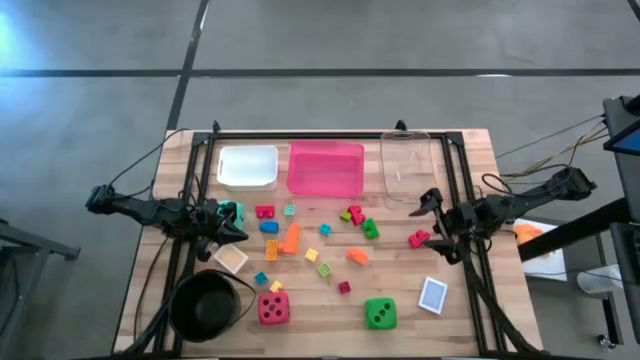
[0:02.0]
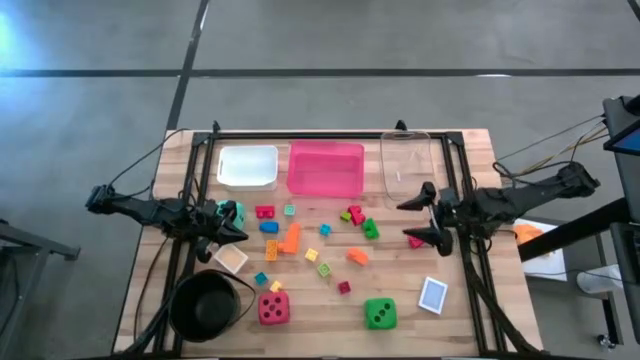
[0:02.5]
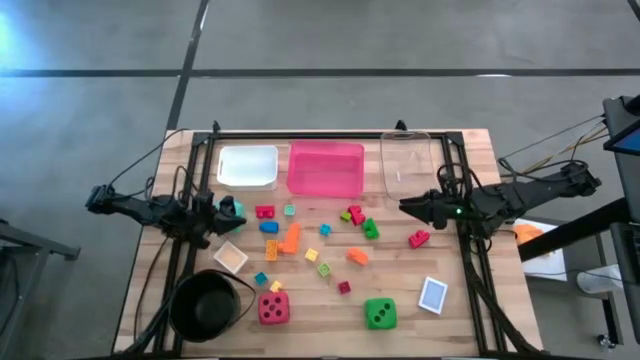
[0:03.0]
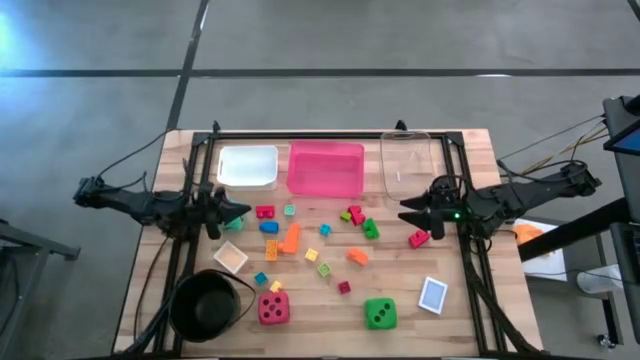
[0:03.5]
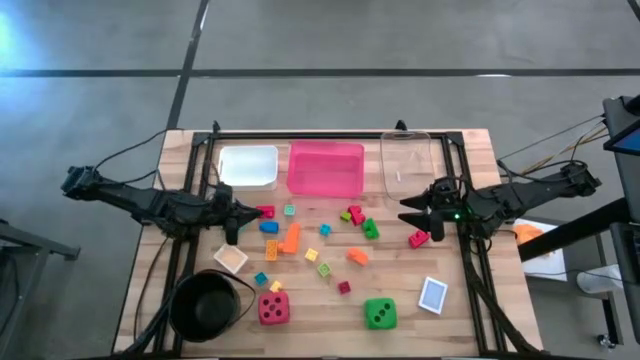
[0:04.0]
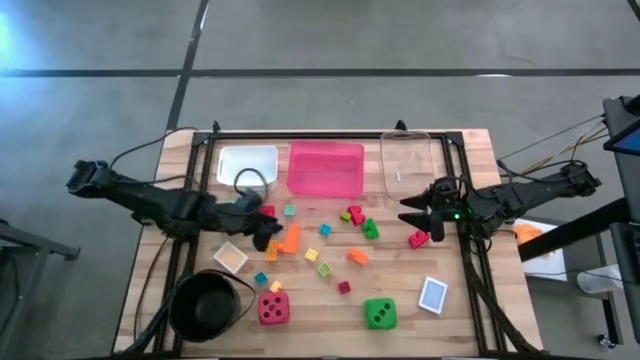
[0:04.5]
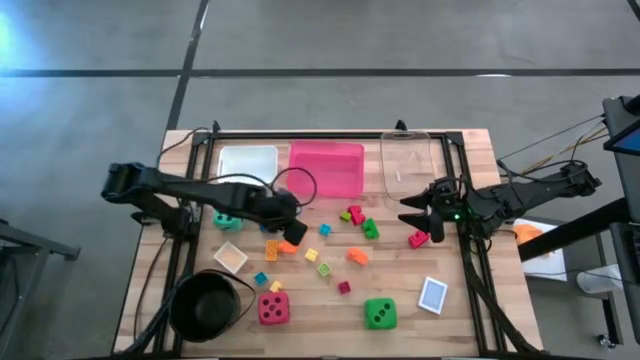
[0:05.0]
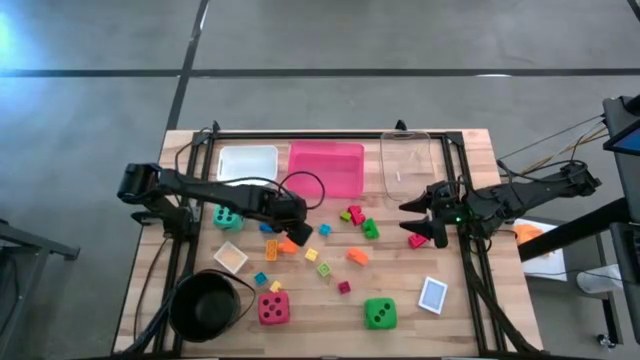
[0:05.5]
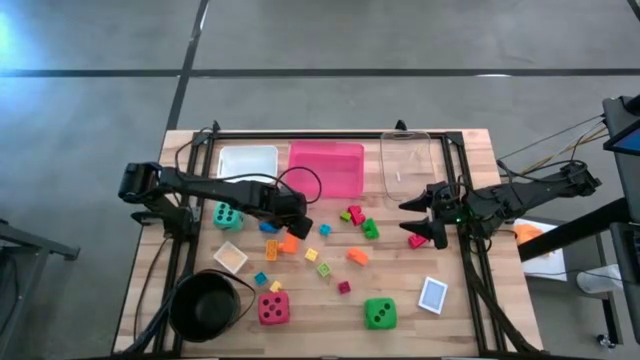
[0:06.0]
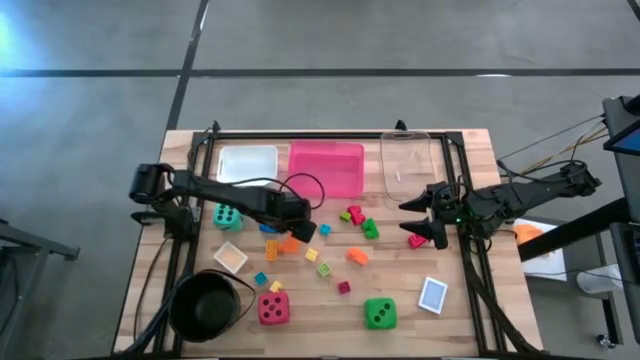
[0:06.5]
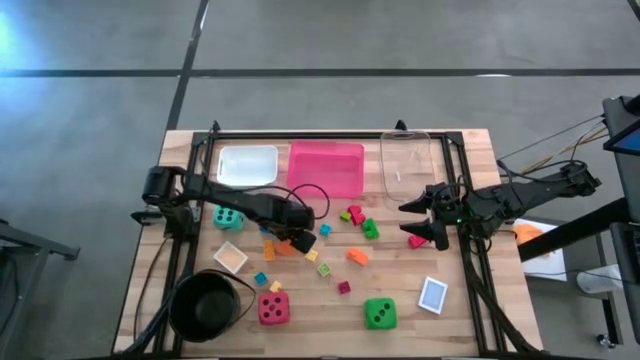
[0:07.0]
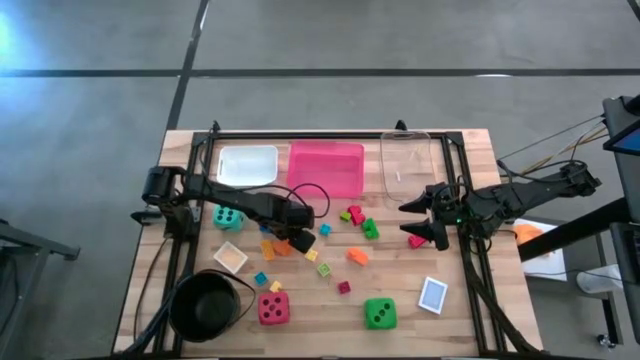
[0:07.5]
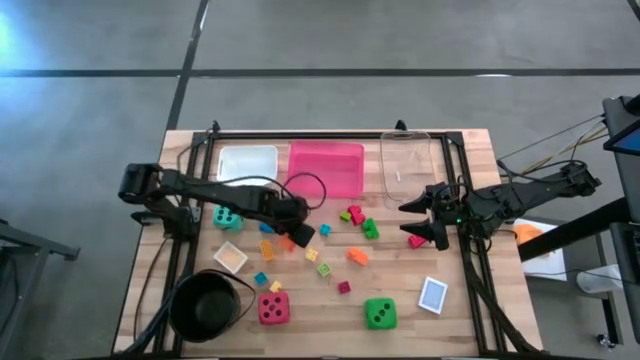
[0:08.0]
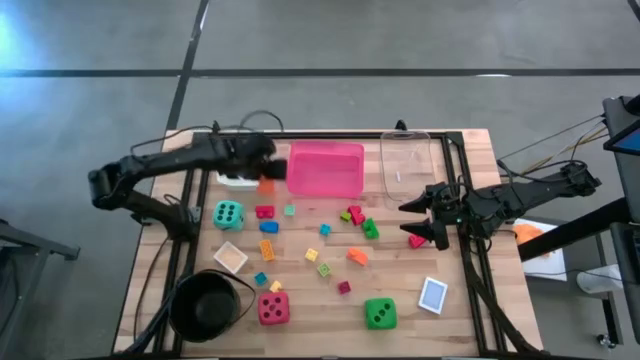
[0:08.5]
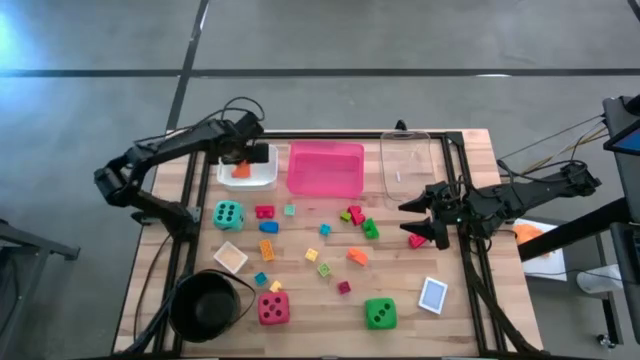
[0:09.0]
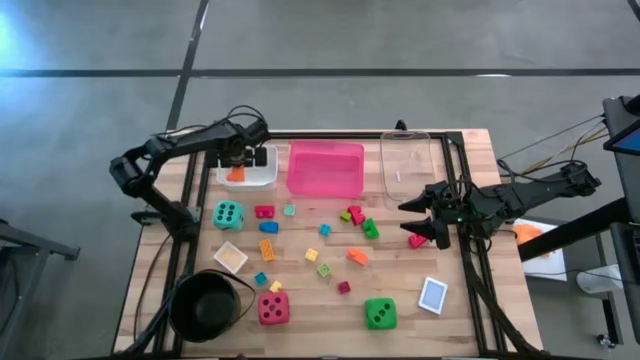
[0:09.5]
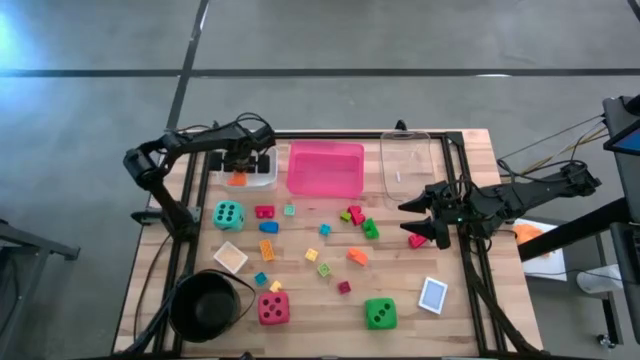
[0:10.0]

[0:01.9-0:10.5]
Task: Pick & Place Toys
Put the orange game piece into the white bin

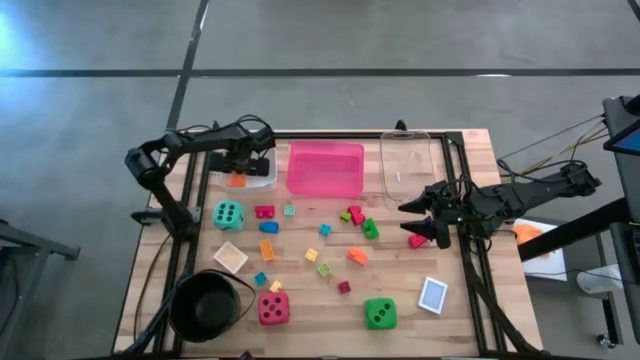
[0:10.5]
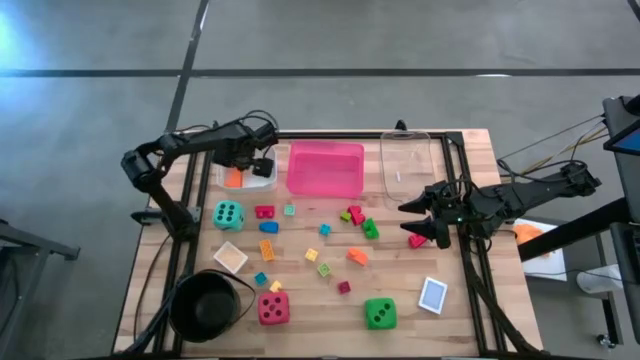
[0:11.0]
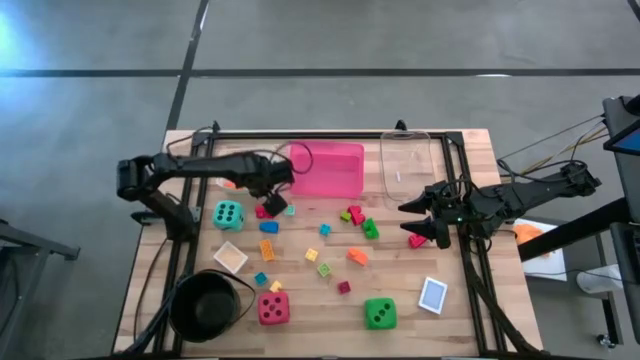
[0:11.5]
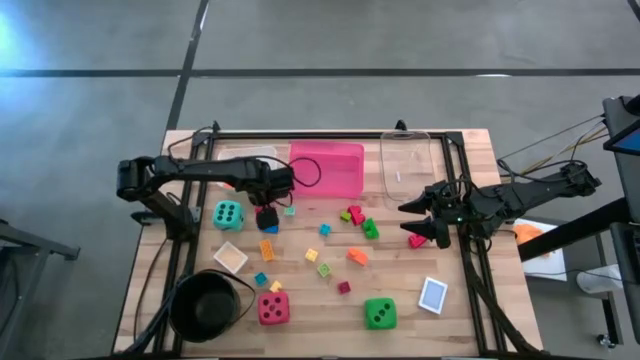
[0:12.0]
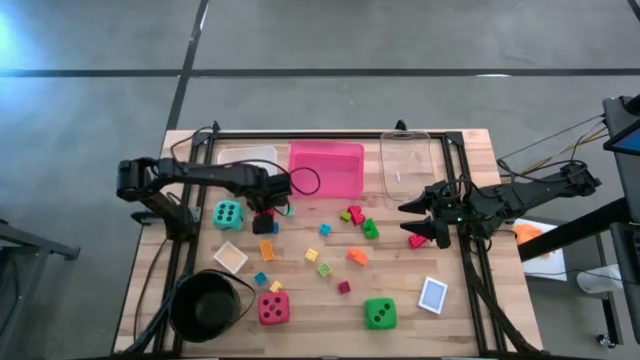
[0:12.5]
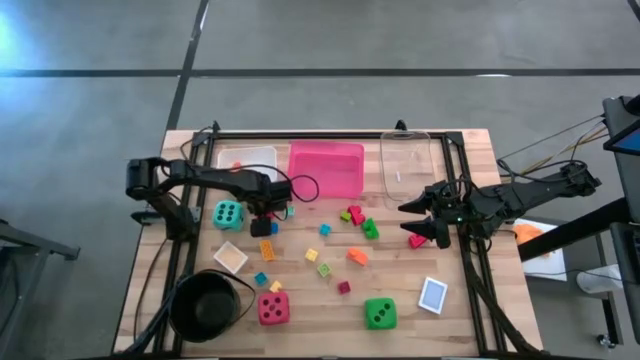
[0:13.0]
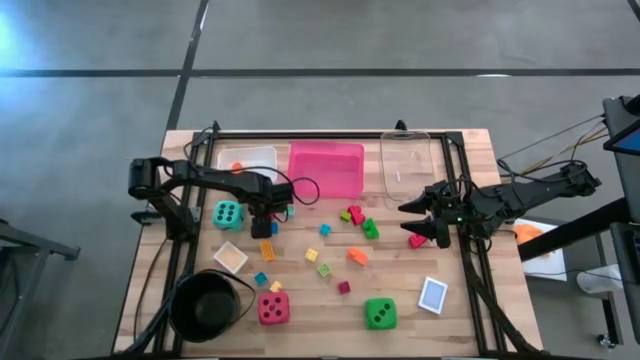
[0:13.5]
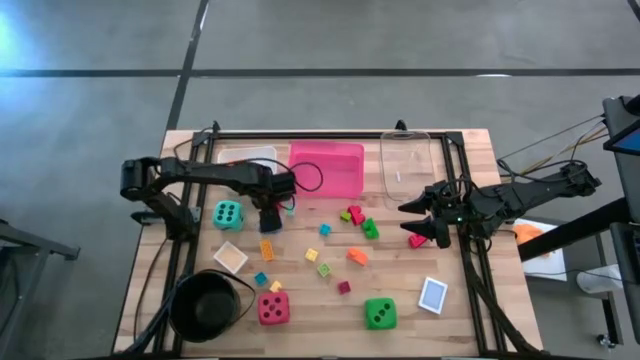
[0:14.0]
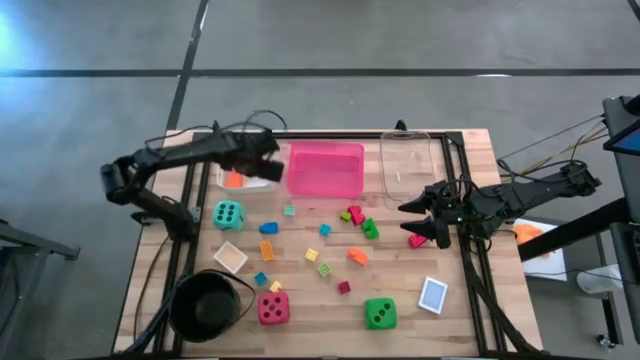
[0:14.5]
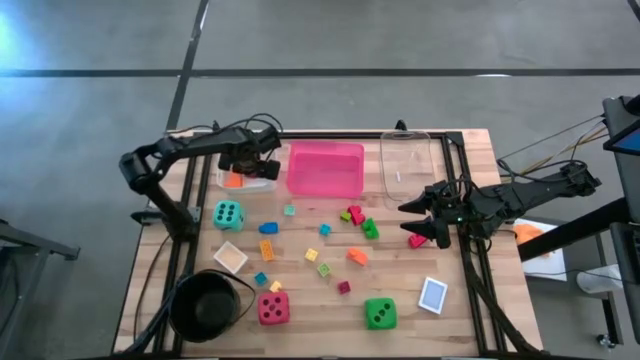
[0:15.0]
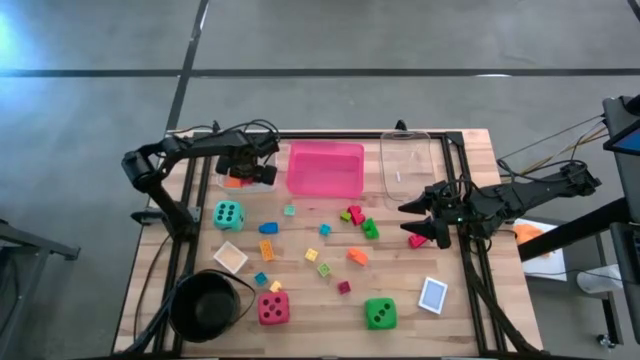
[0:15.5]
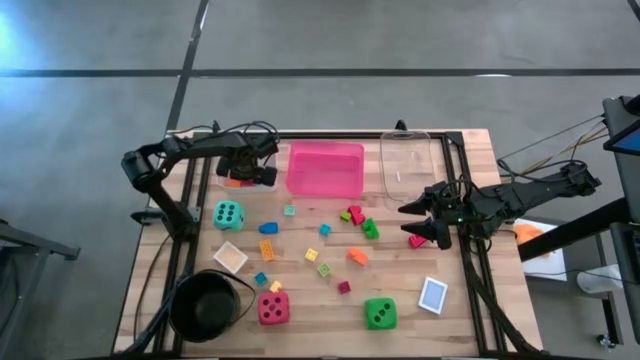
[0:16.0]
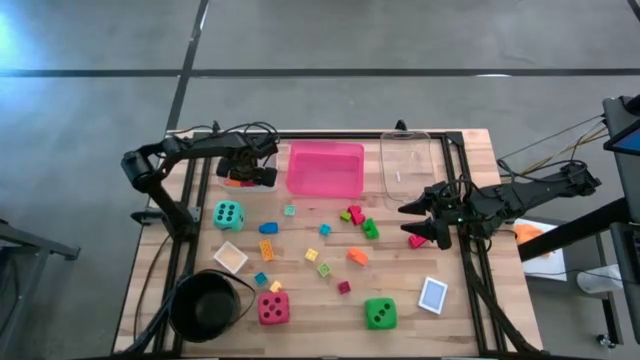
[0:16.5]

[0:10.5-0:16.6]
Put the red game piece into the white bin

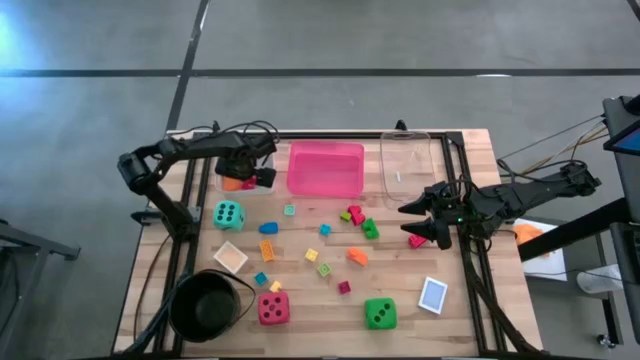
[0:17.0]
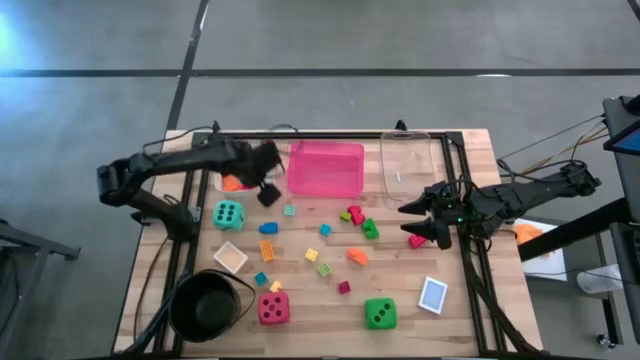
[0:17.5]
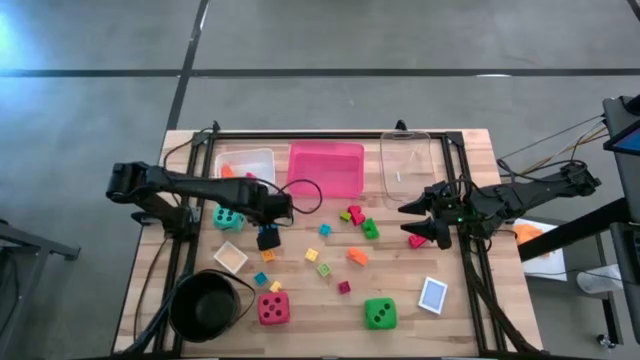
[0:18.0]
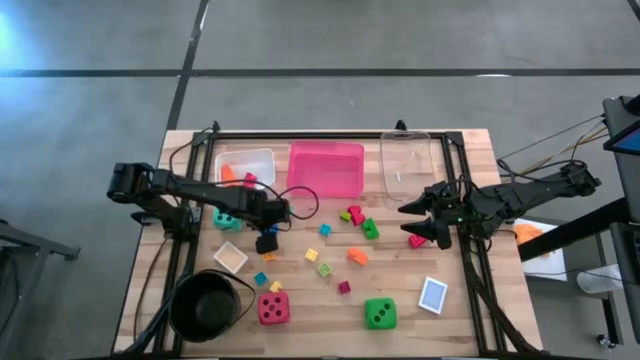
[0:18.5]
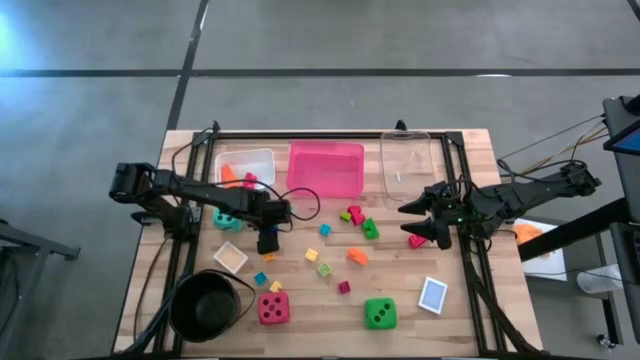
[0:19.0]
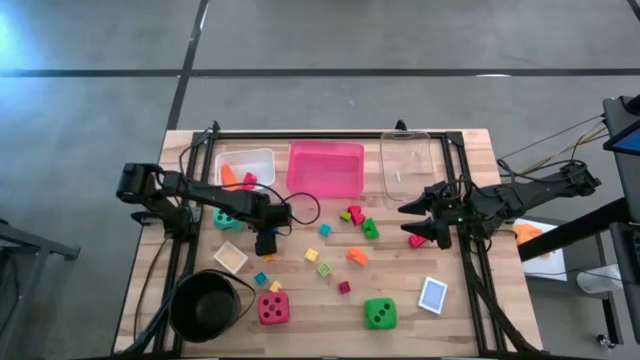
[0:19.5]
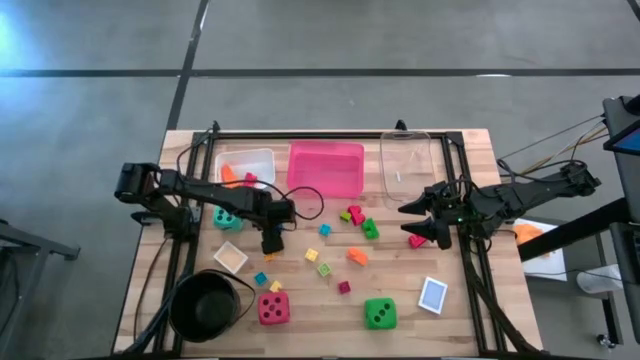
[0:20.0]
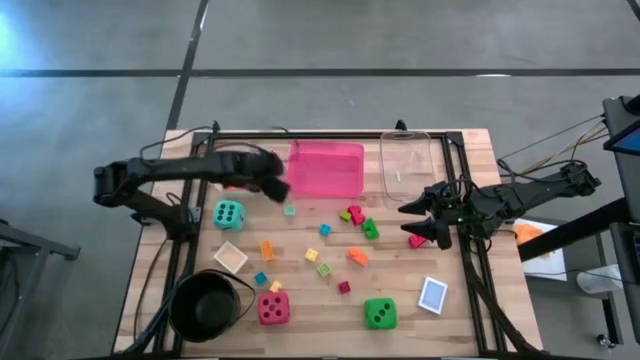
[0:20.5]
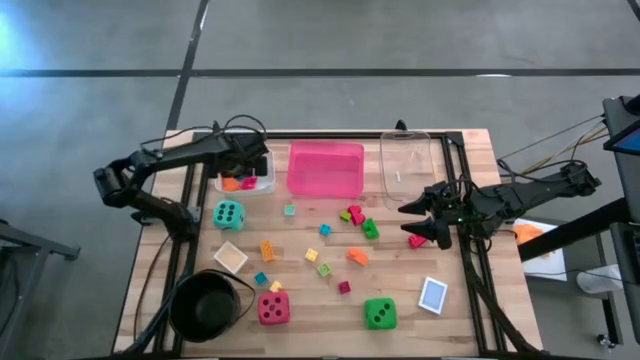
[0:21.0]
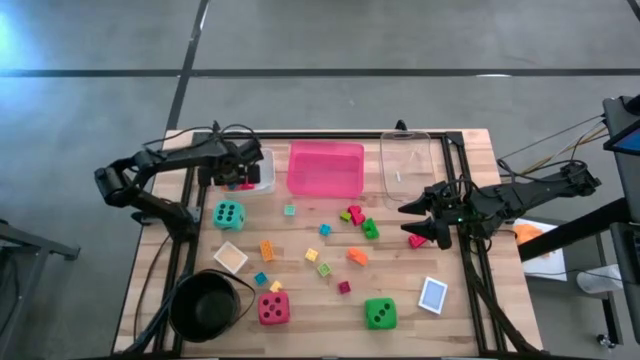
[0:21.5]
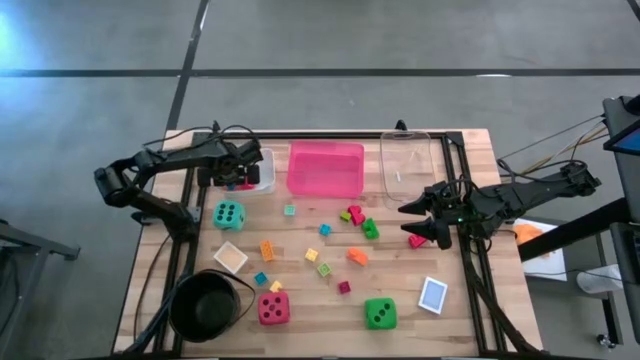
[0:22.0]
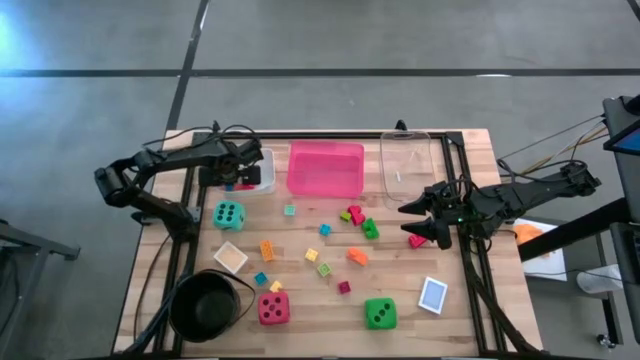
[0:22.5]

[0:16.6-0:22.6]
Put the blue game piece into the white bin
